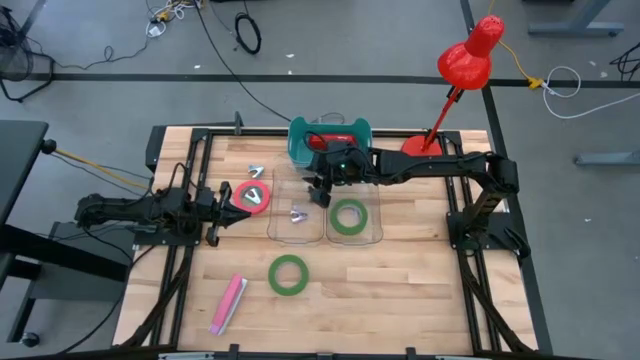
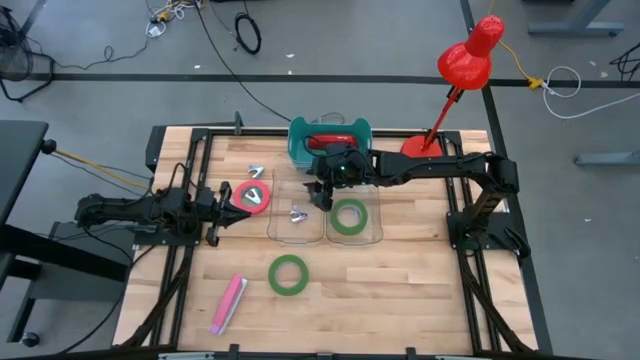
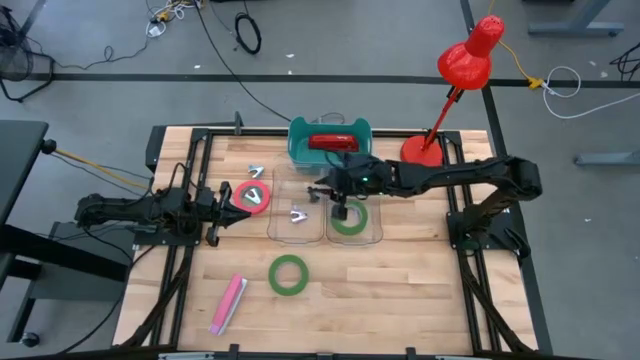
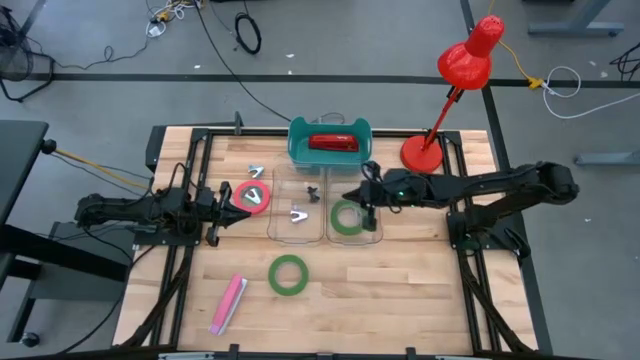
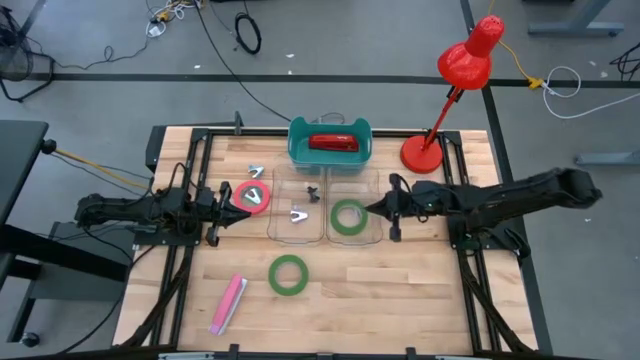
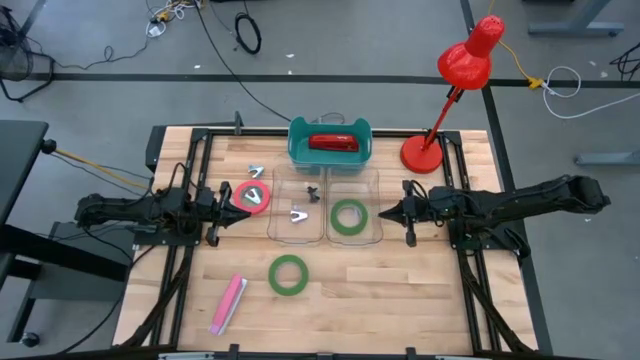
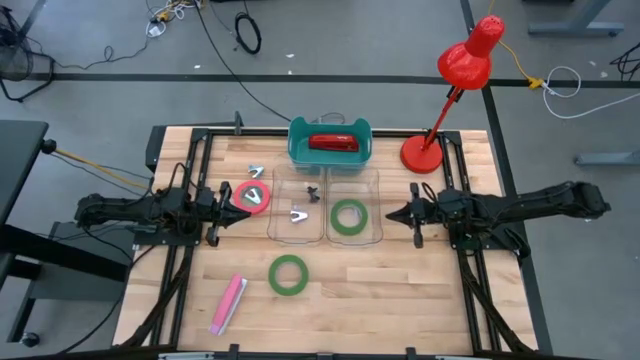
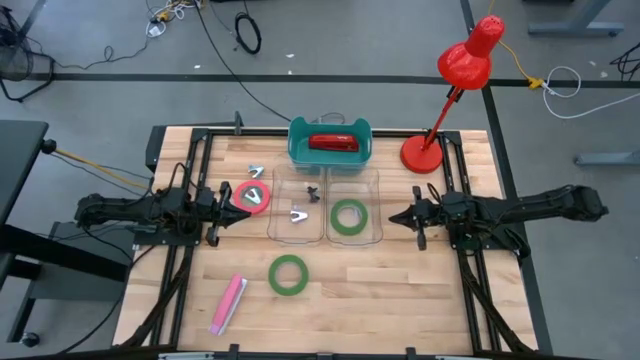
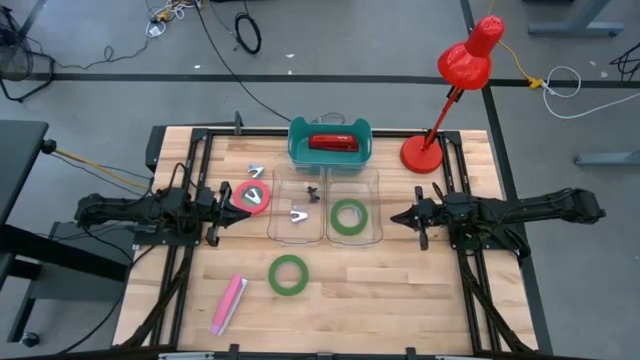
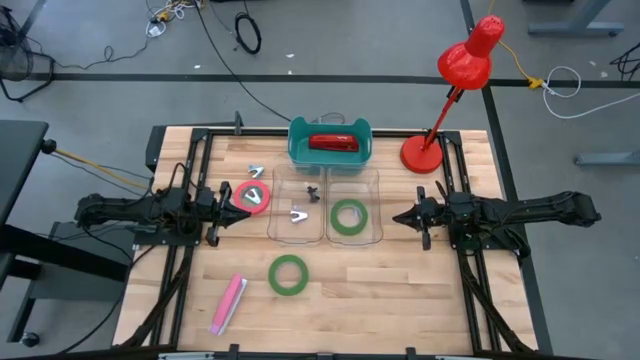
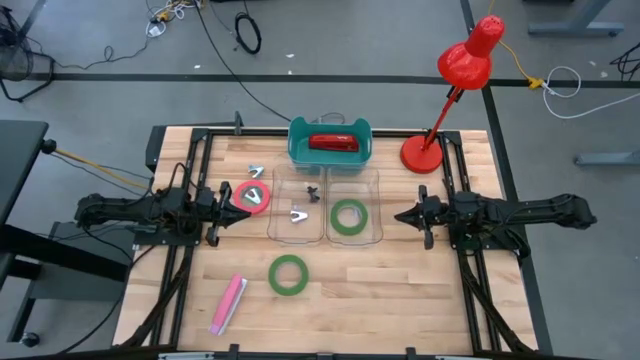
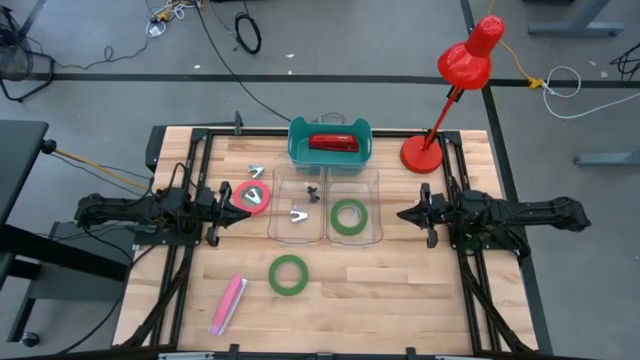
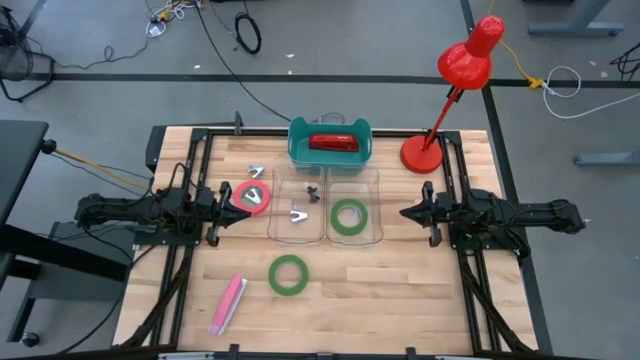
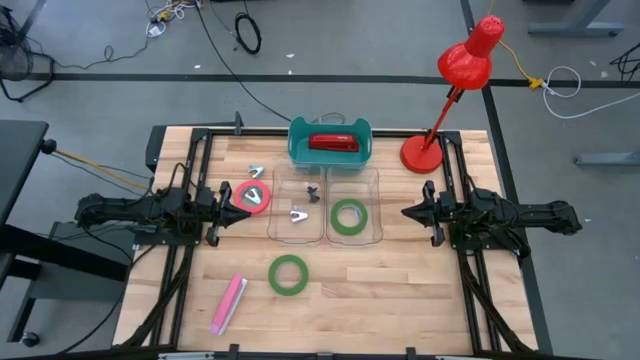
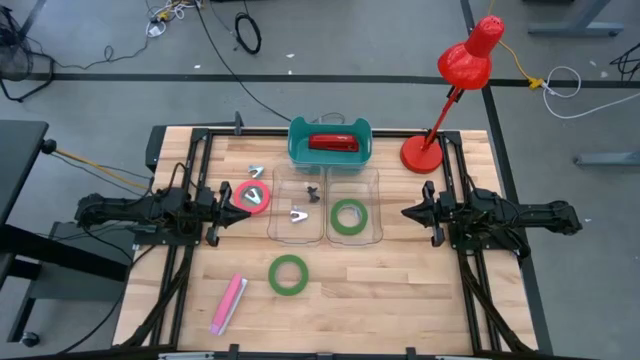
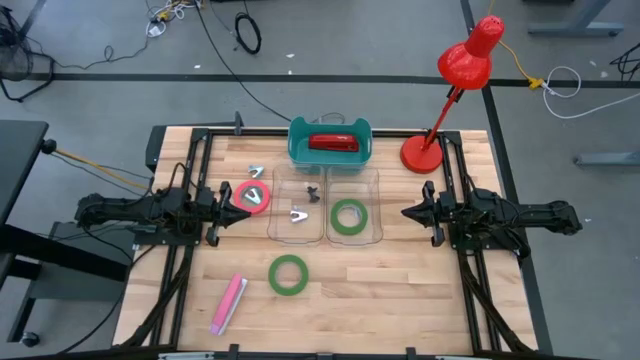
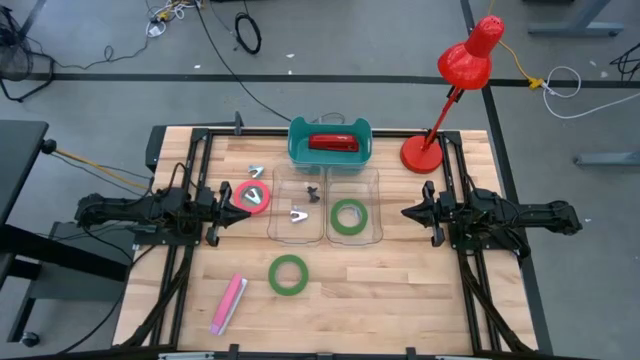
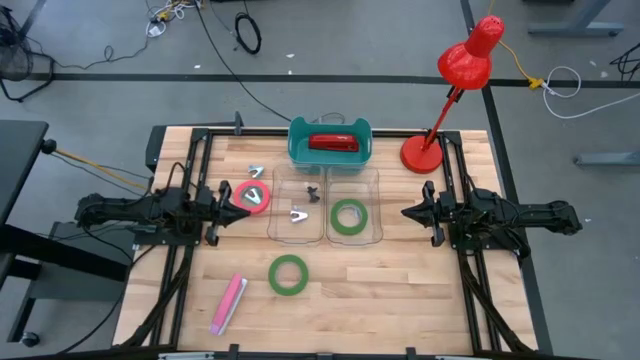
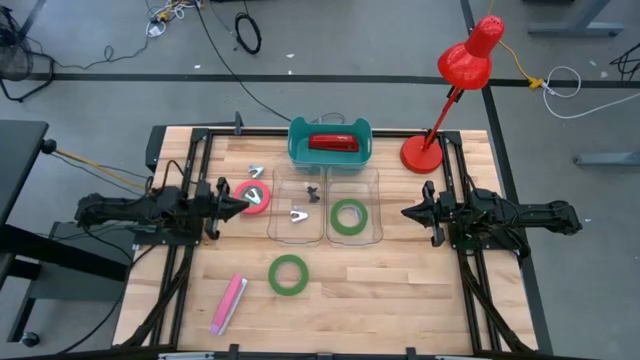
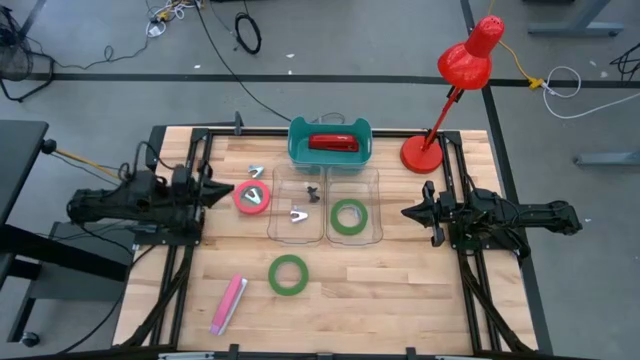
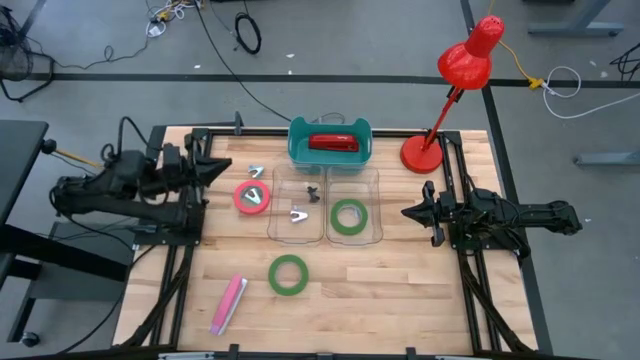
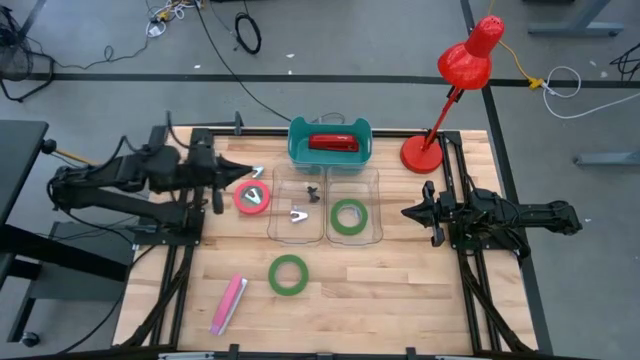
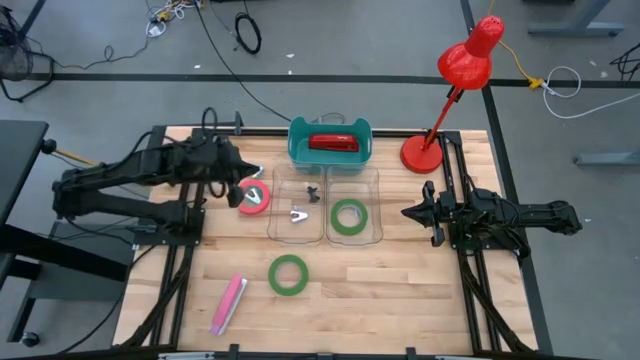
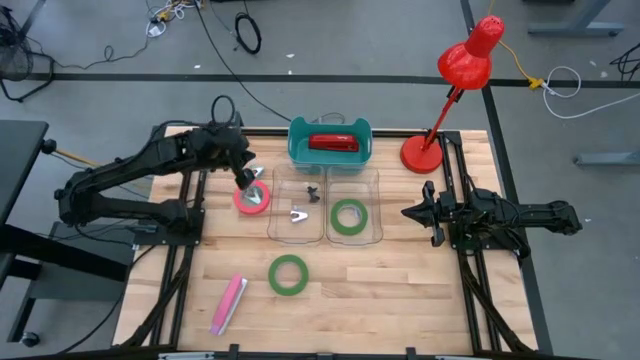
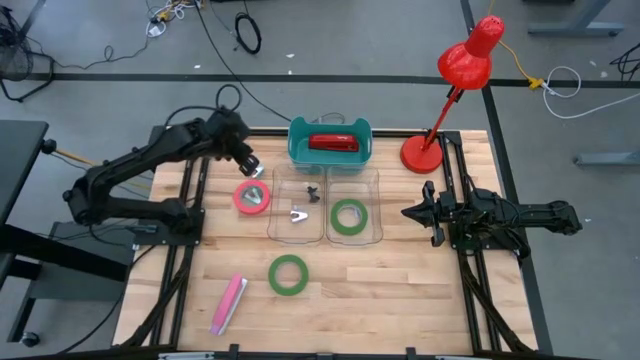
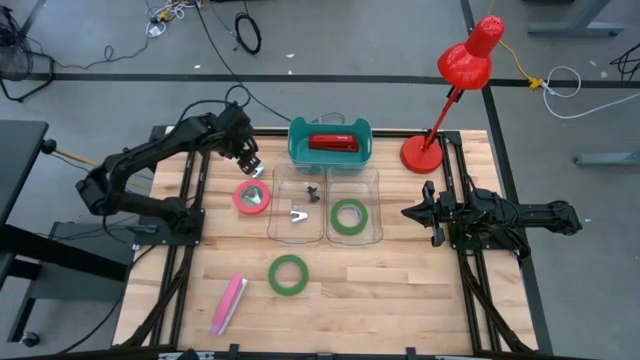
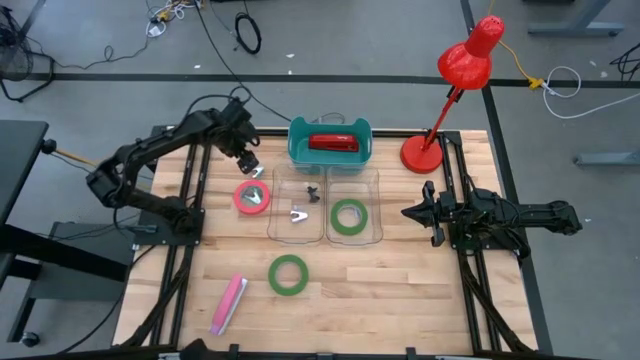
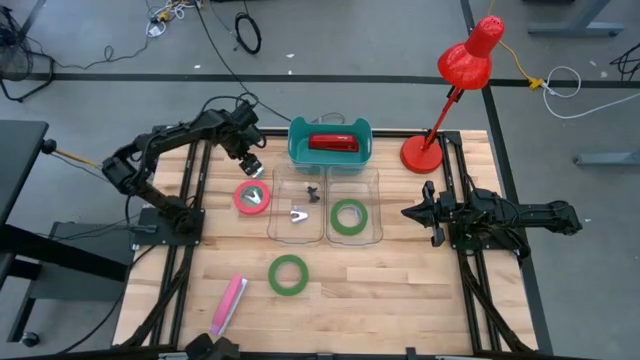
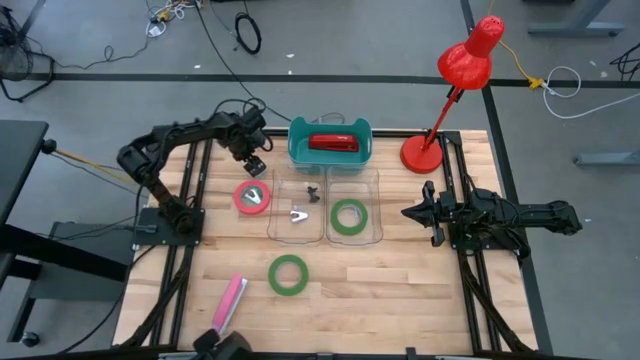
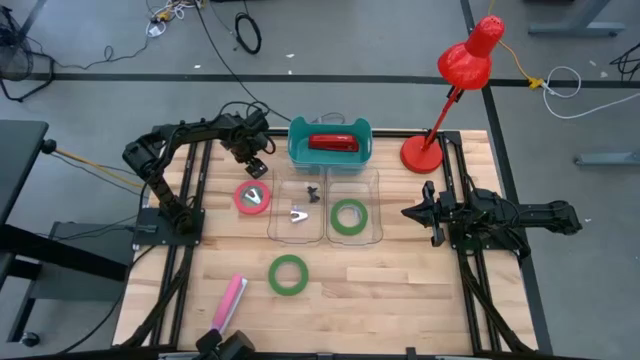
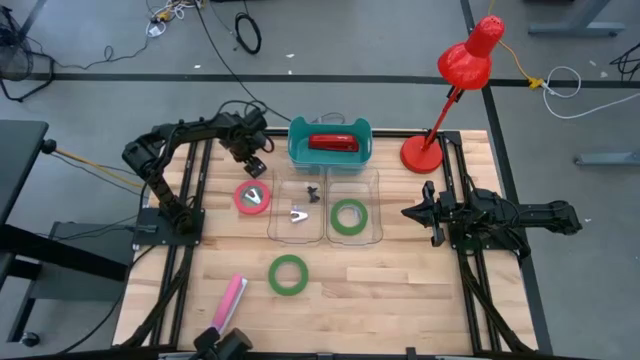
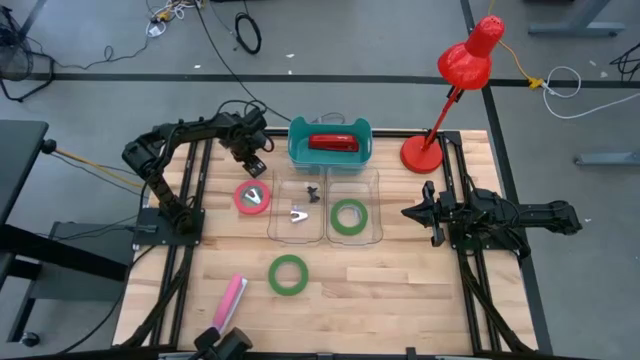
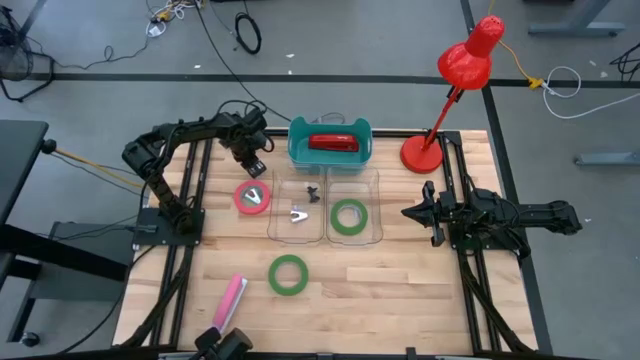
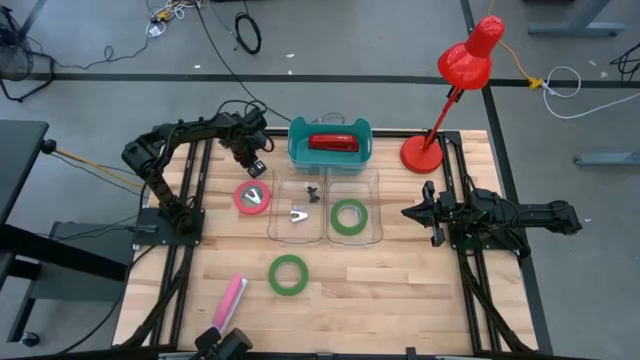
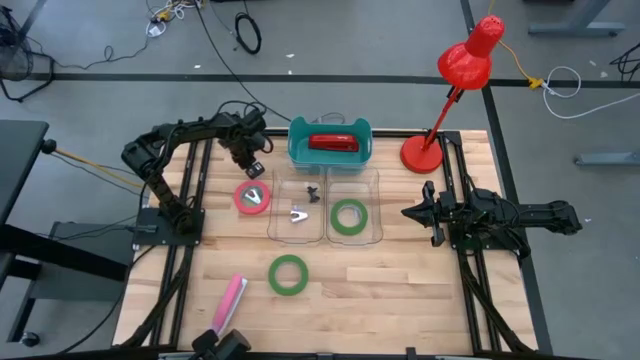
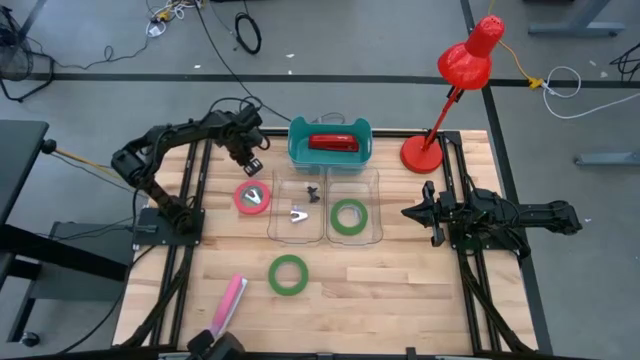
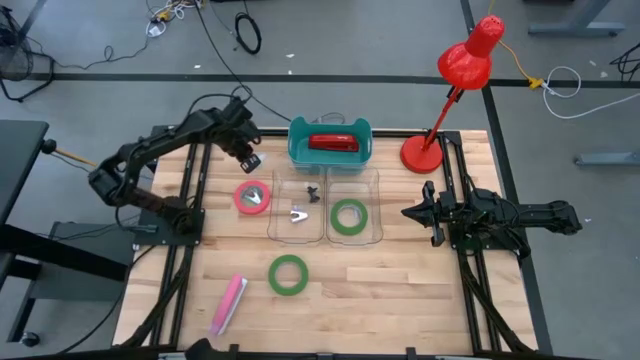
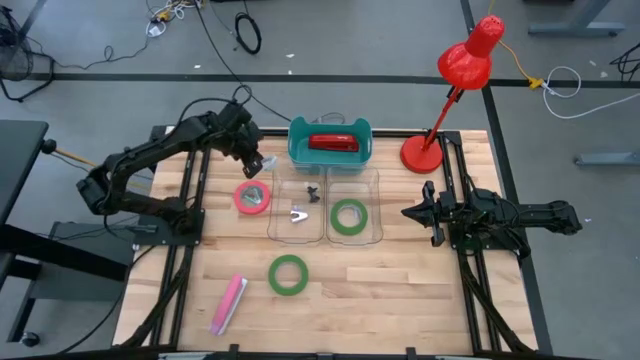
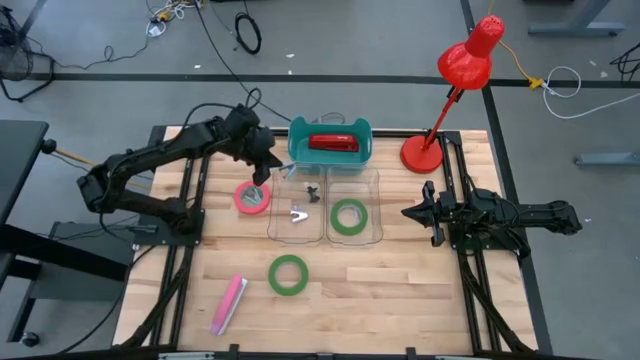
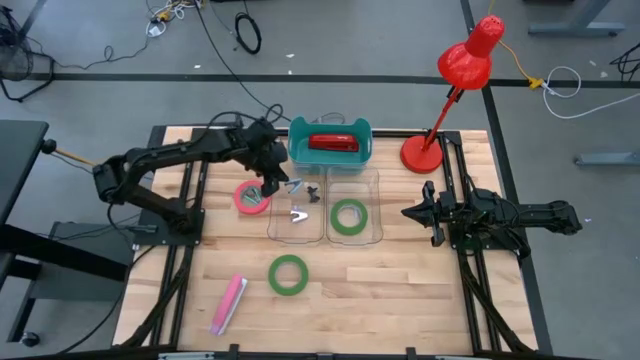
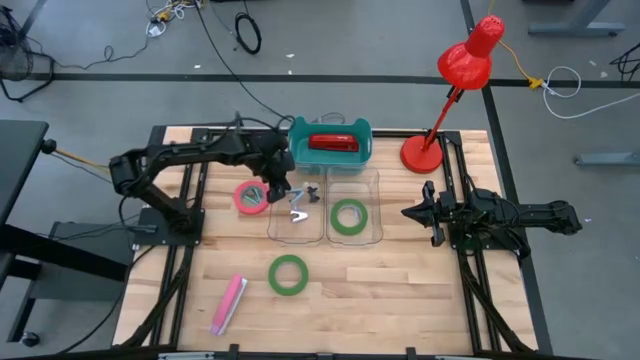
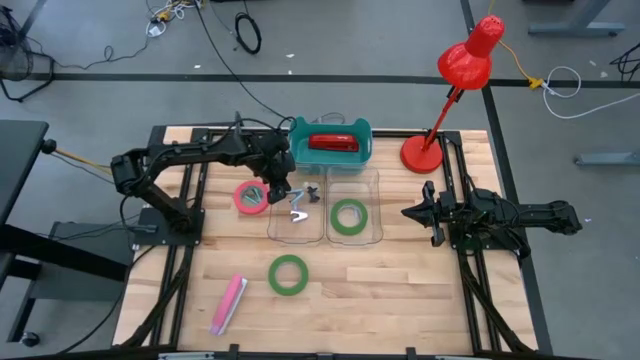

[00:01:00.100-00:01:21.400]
Task: Pick and place Stapler, Stapler remover, tape
Put the top blue staple remover into the left transparent bin
